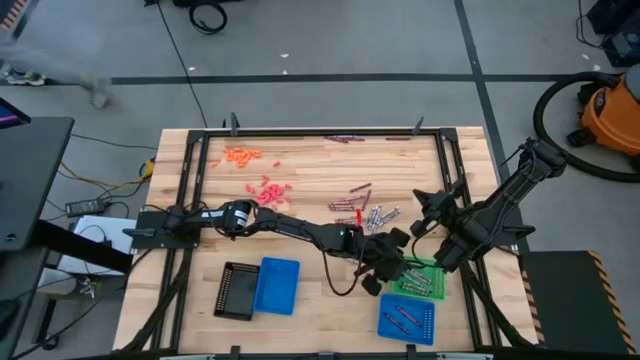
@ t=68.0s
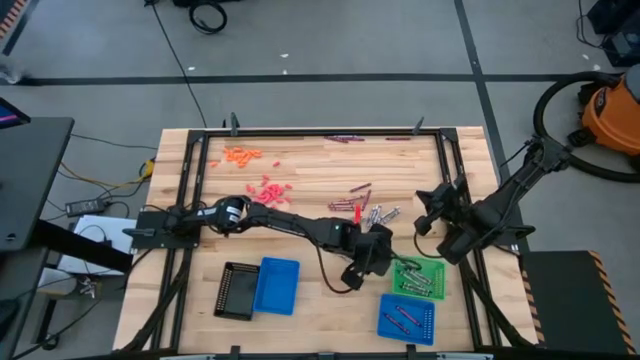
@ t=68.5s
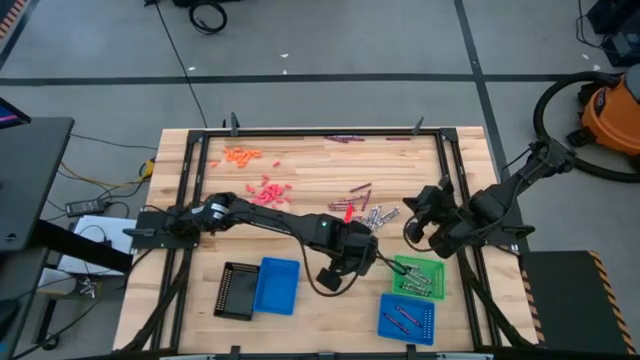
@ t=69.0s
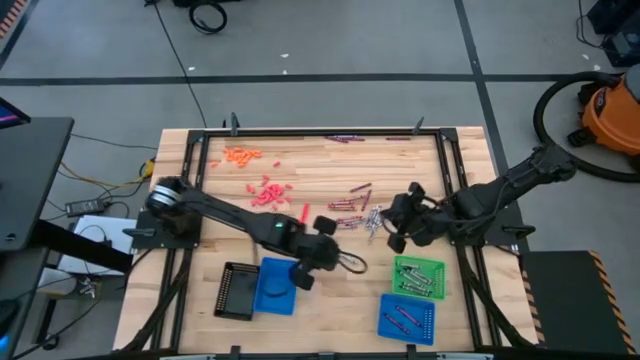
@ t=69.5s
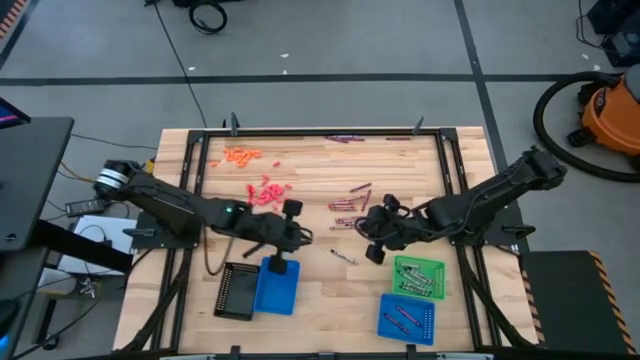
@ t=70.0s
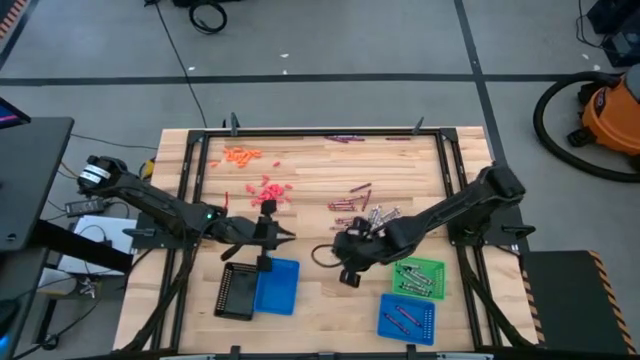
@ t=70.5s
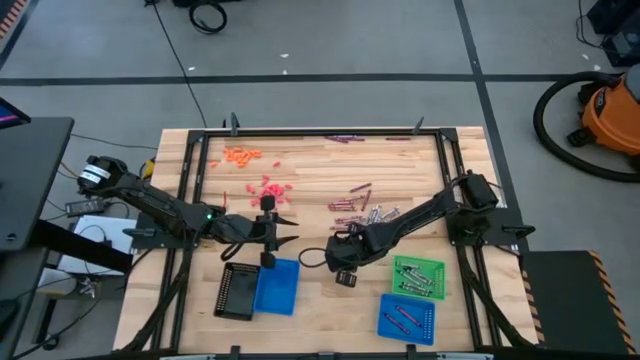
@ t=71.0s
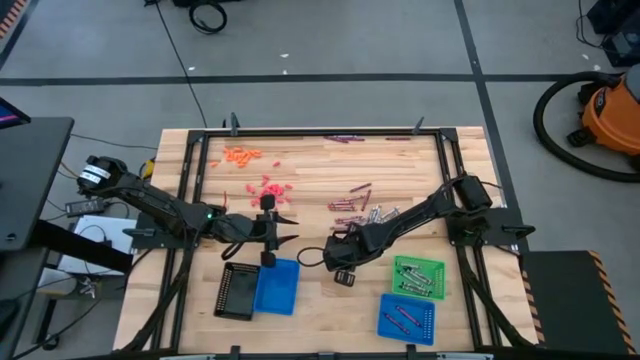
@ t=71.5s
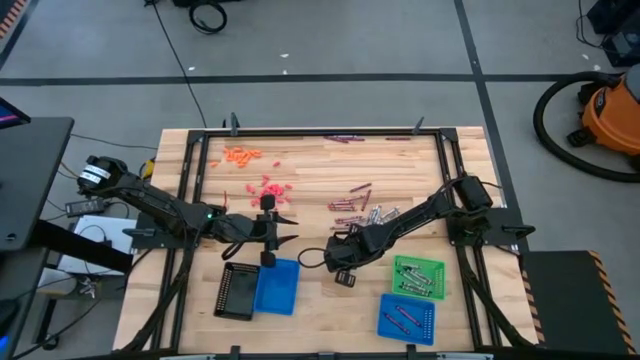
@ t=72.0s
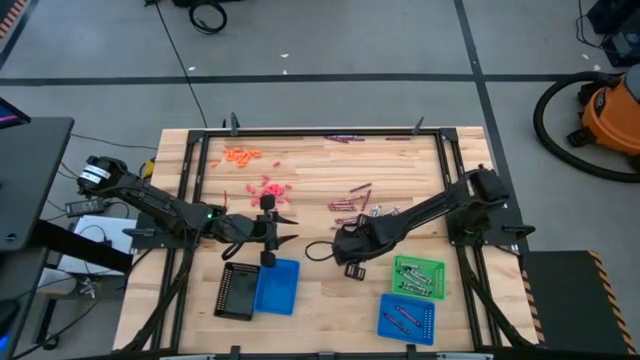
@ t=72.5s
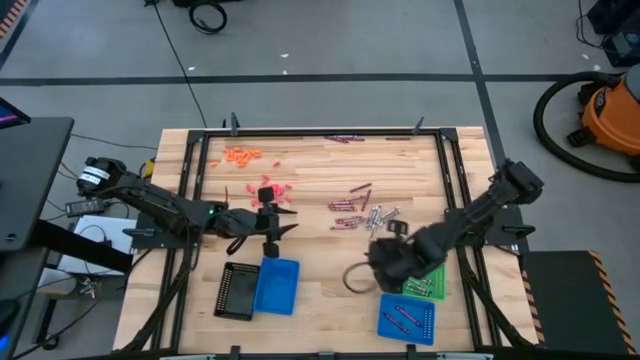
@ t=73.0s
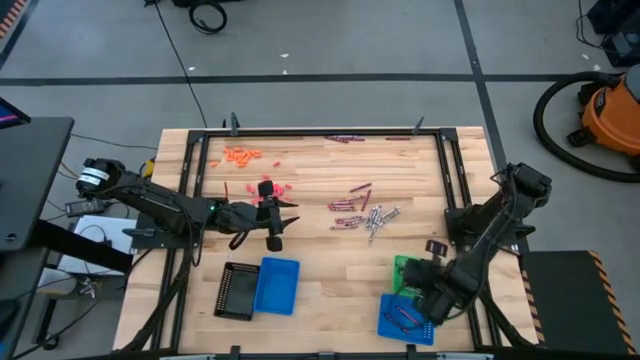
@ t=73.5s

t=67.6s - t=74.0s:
Task: Sort crayons
Put the black crayon into the green bin

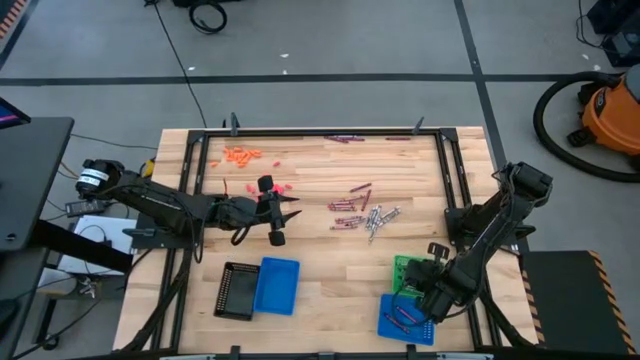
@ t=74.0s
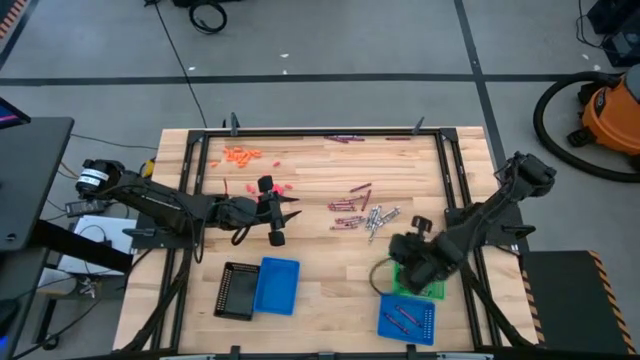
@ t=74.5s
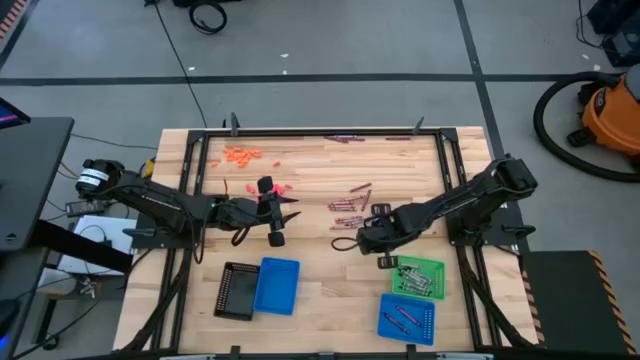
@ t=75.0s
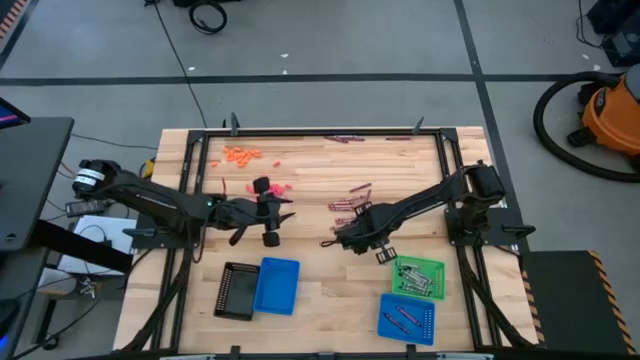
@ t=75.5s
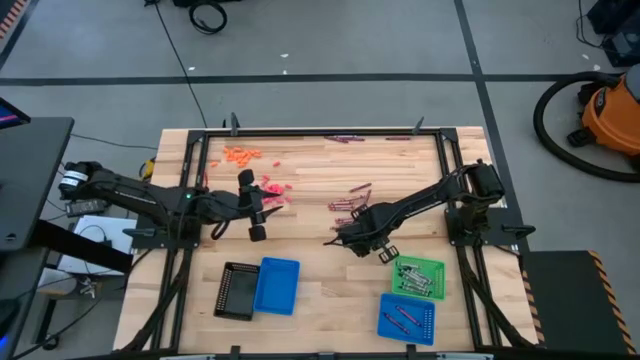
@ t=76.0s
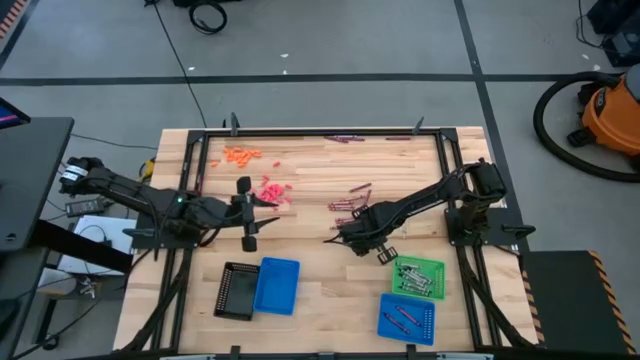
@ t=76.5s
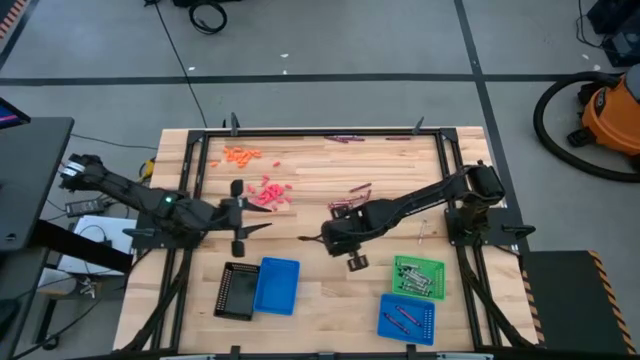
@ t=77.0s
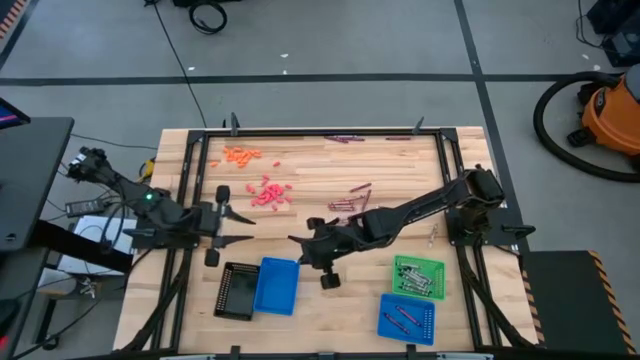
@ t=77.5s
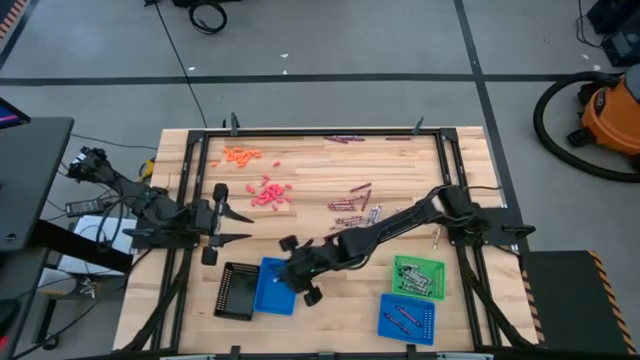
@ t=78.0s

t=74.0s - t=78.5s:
Put the white crayon into the left blue bin

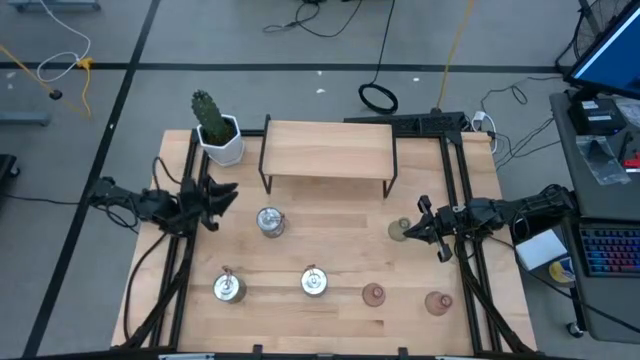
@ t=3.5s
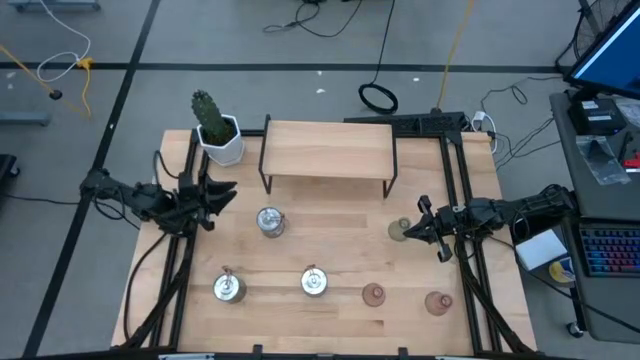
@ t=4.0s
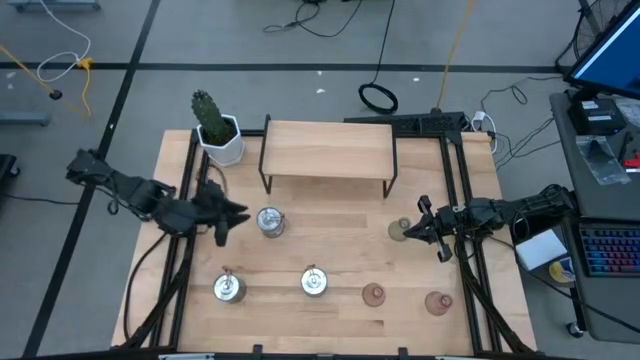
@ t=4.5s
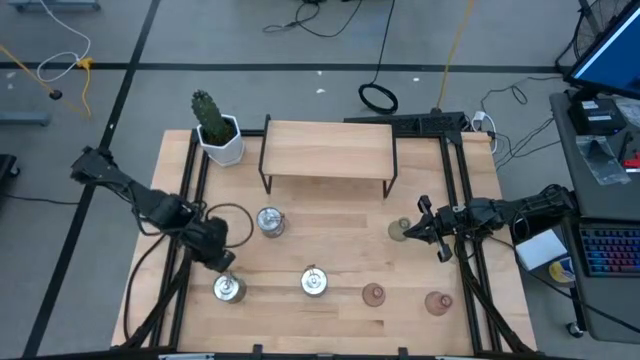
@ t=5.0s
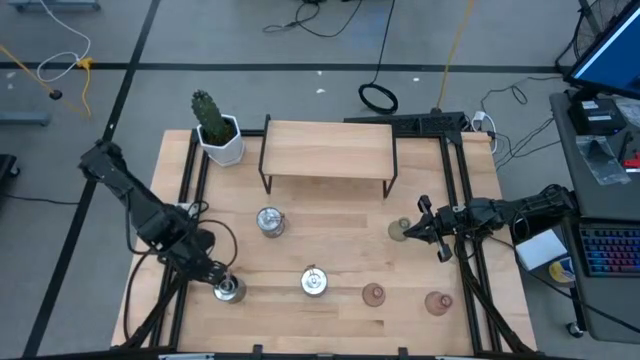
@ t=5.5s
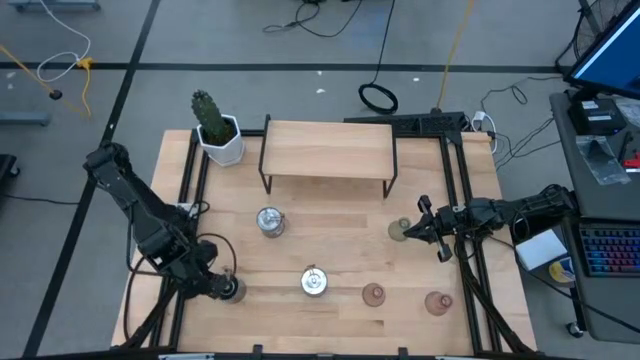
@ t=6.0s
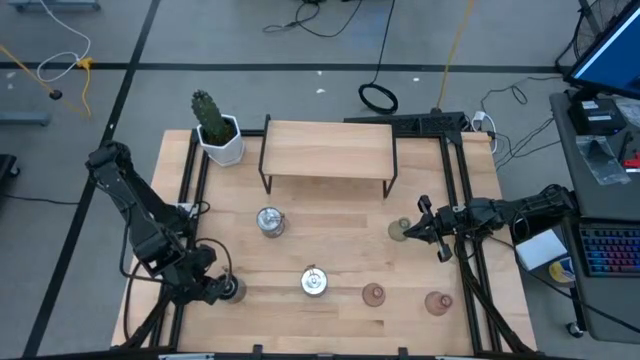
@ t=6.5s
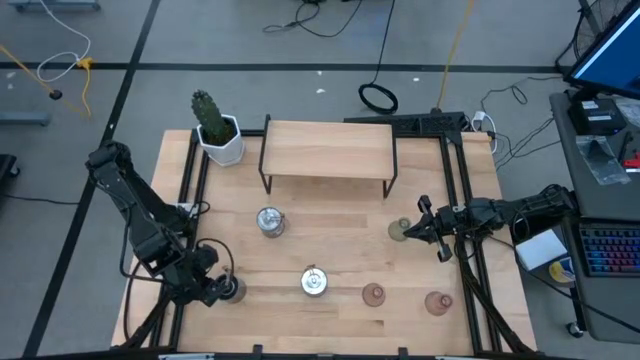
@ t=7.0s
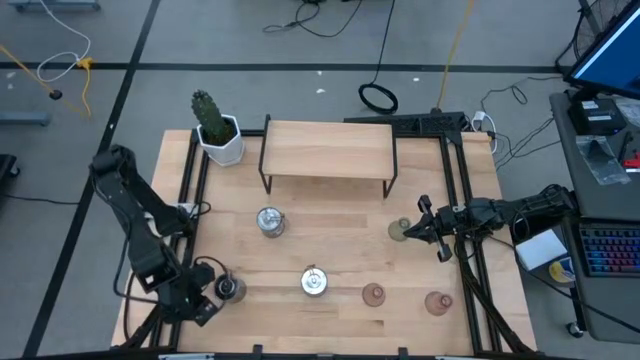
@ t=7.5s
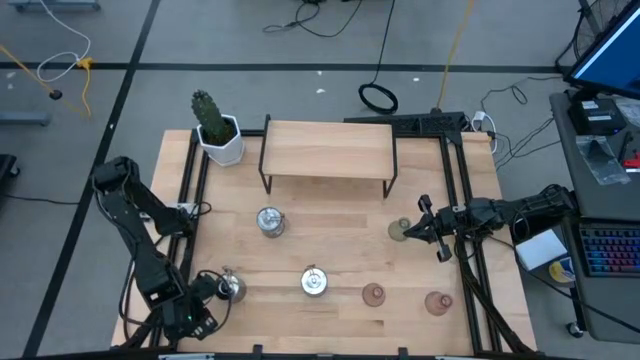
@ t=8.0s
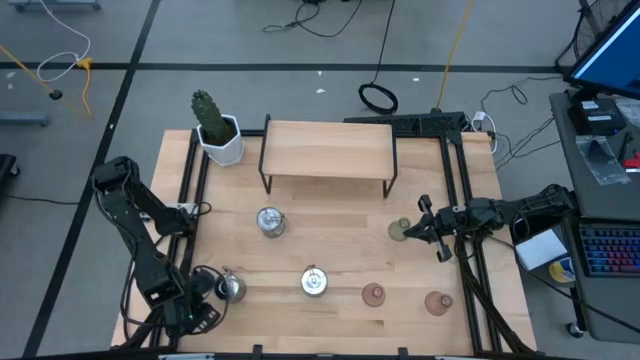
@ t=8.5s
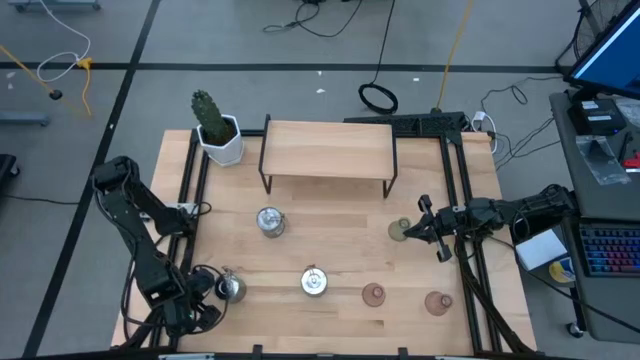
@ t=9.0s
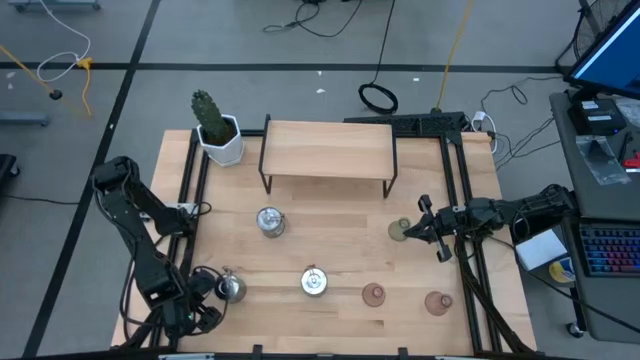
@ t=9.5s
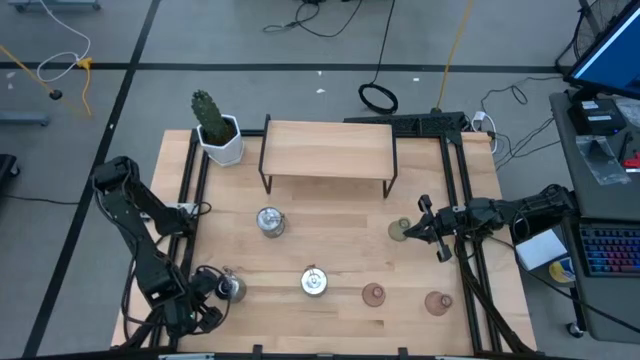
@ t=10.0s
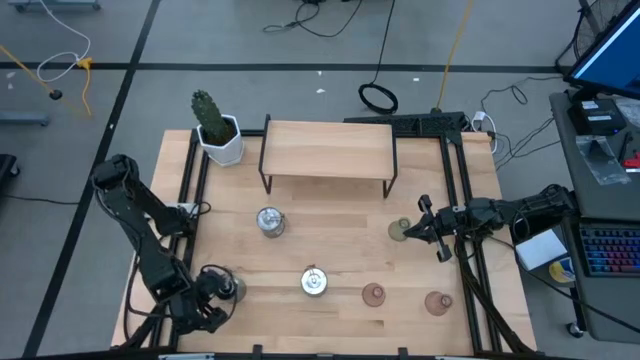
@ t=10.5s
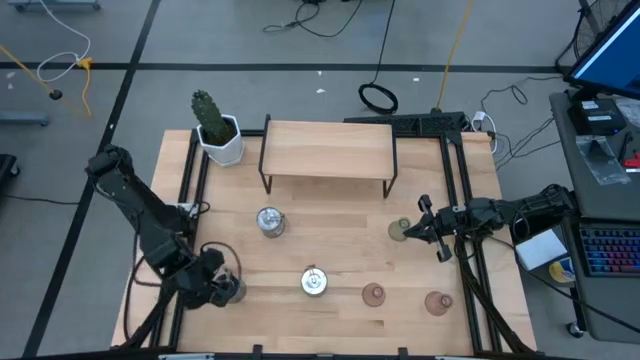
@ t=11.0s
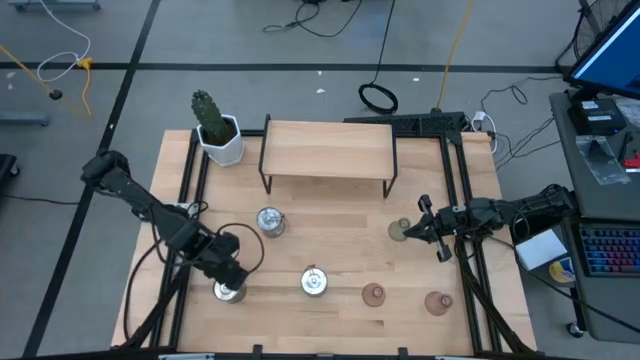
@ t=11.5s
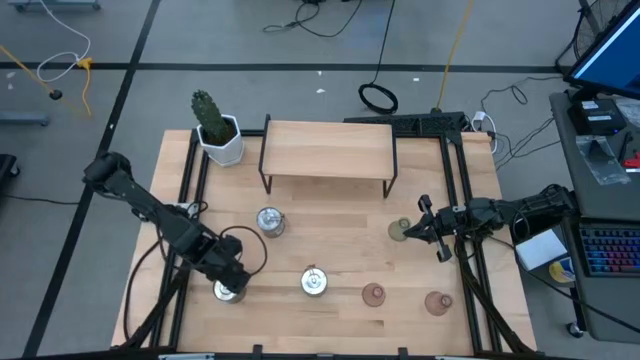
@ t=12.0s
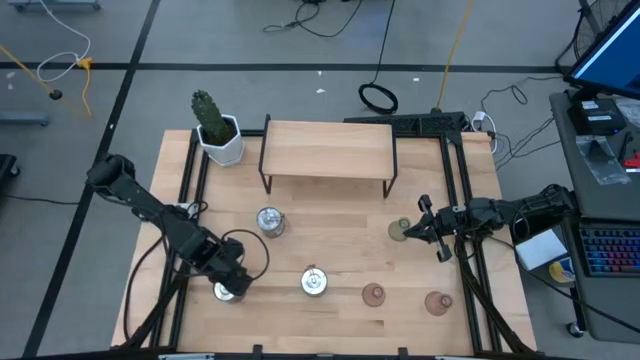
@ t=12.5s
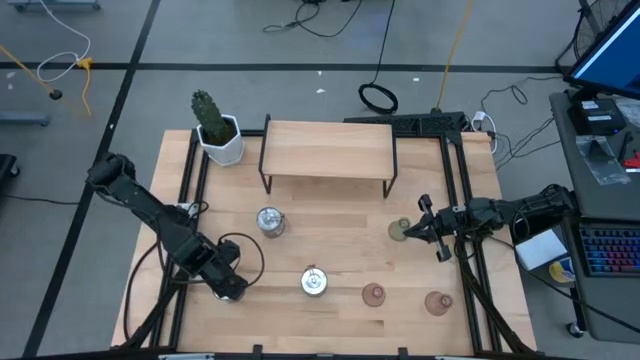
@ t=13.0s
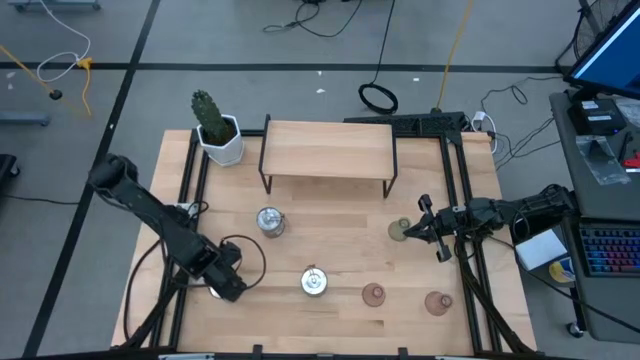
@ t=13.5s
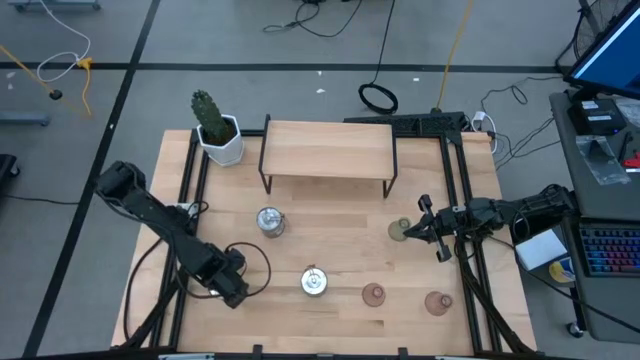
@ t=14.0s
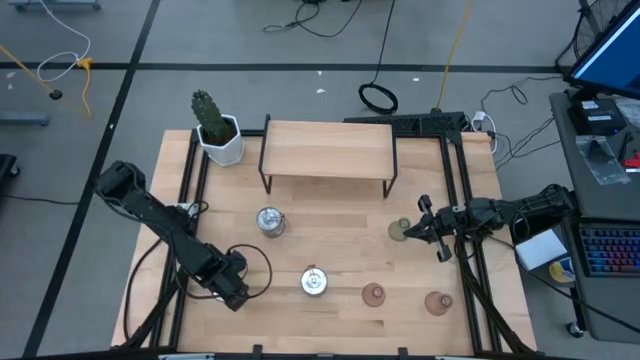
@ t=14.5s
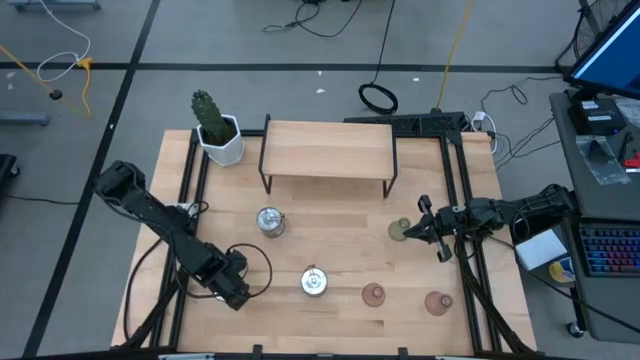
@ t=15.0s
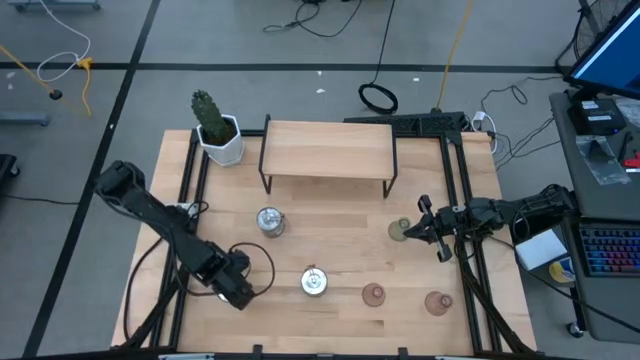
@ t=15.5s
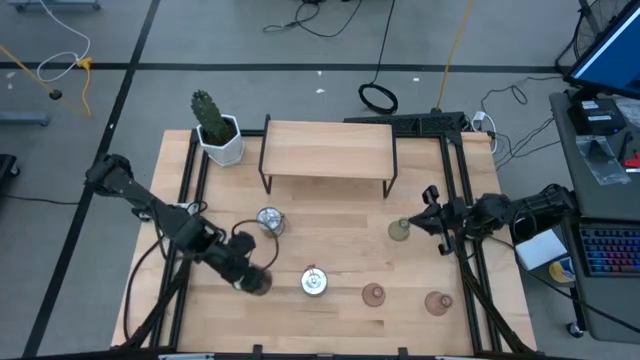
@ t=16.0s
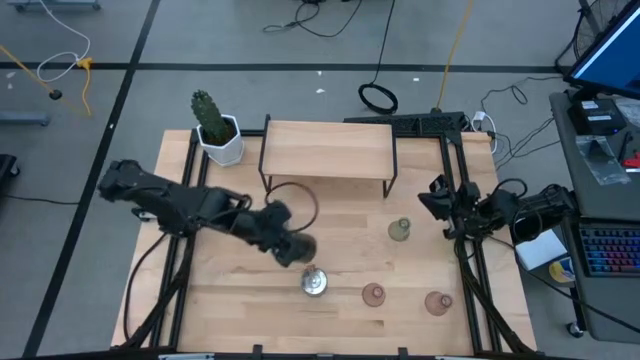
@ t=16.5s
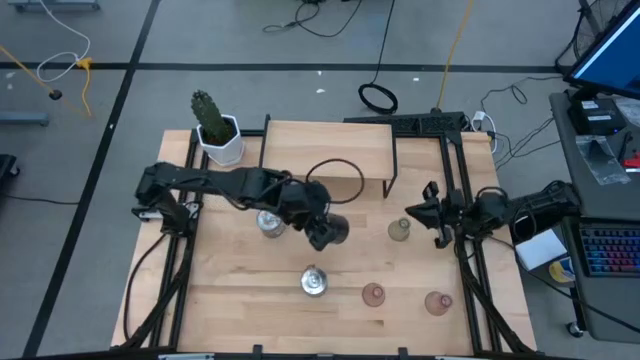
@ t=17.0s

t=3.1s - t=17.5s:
Task: Pick & Place candle stick holders
Put the bottom left silver scented candle on the shelf
